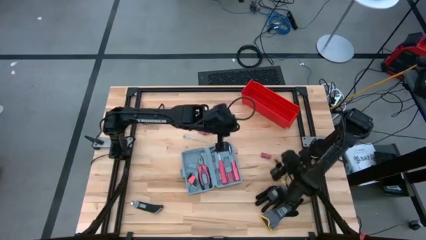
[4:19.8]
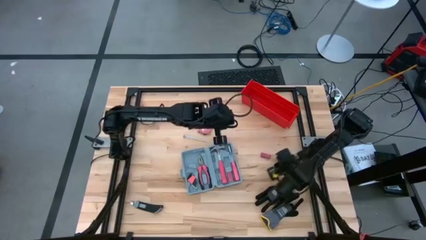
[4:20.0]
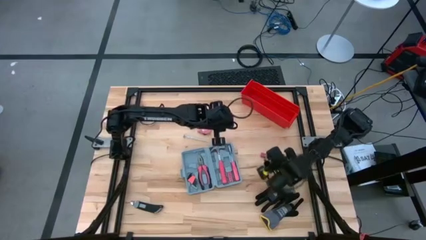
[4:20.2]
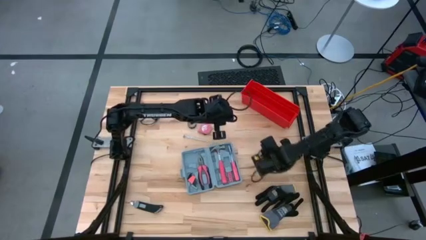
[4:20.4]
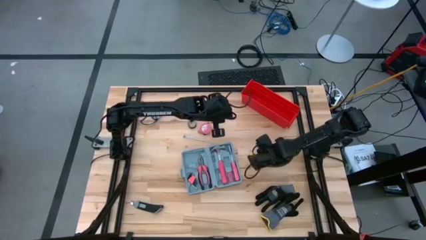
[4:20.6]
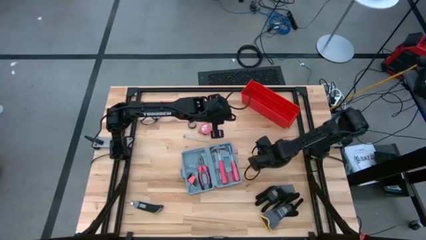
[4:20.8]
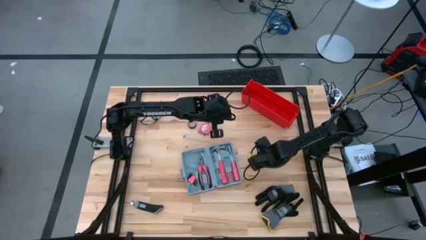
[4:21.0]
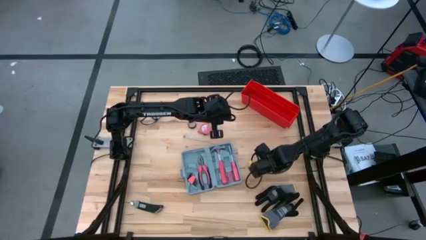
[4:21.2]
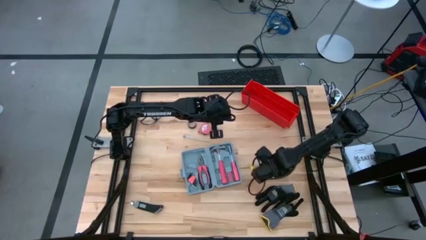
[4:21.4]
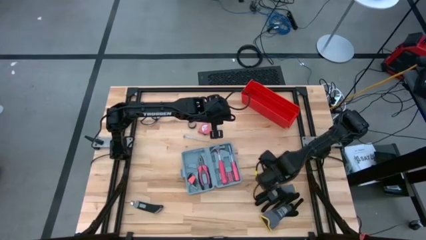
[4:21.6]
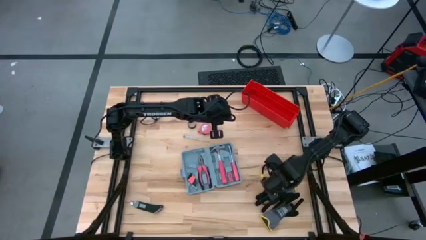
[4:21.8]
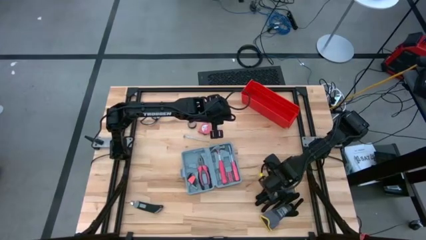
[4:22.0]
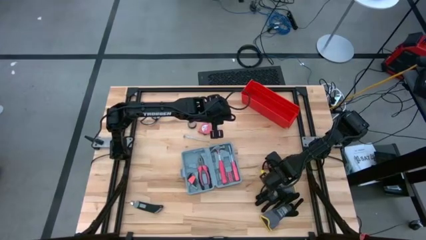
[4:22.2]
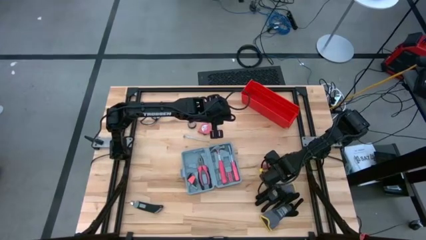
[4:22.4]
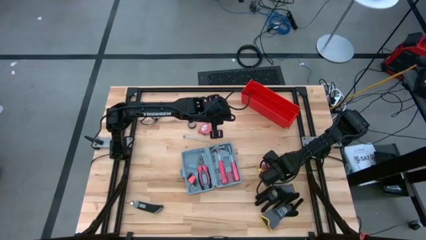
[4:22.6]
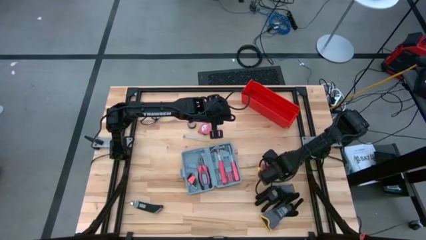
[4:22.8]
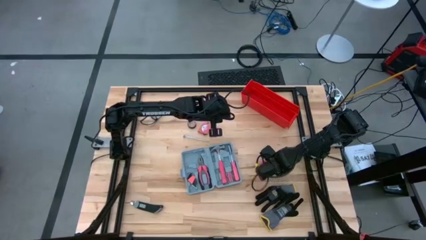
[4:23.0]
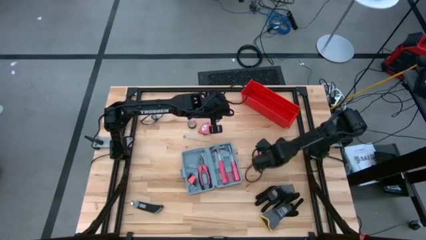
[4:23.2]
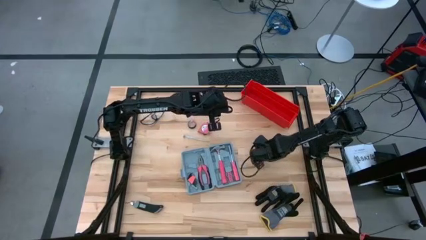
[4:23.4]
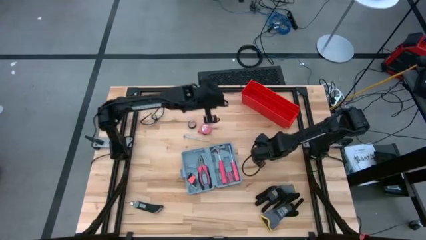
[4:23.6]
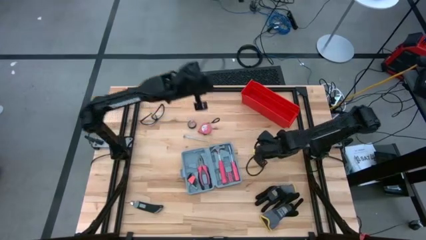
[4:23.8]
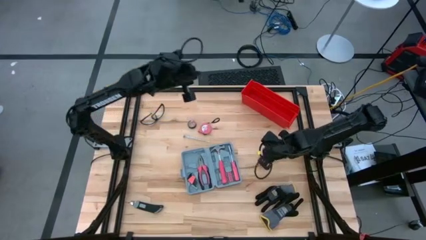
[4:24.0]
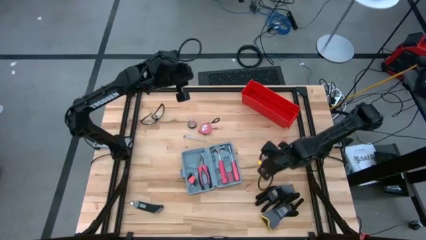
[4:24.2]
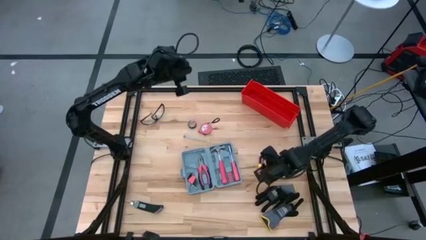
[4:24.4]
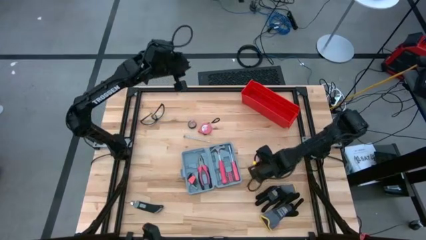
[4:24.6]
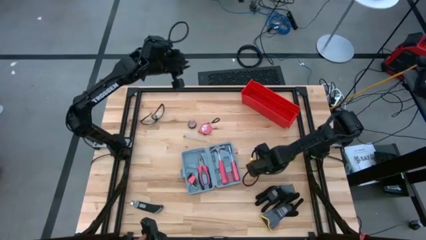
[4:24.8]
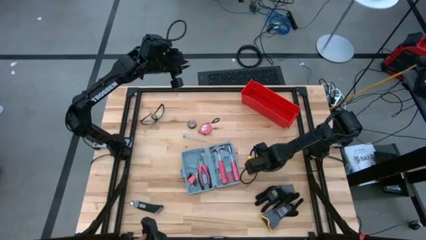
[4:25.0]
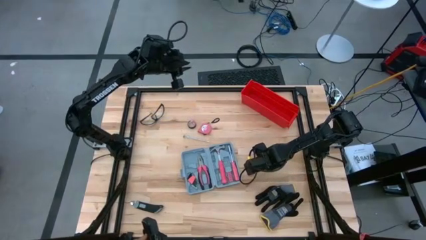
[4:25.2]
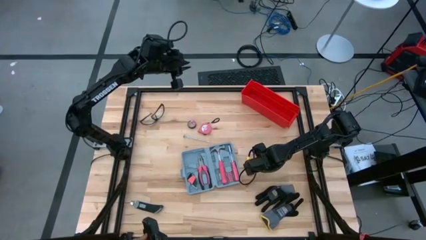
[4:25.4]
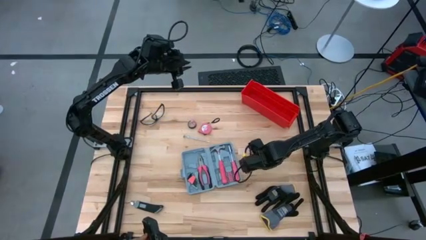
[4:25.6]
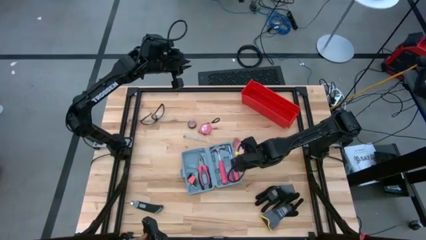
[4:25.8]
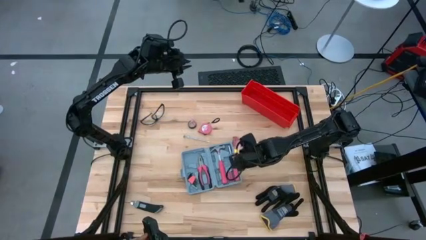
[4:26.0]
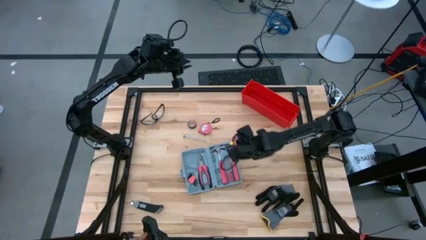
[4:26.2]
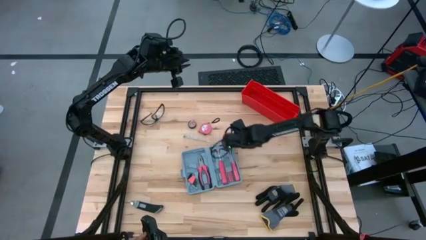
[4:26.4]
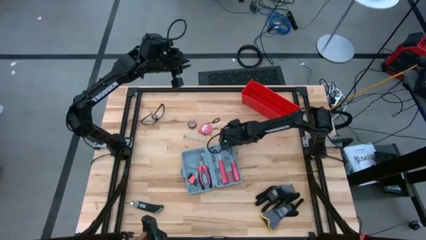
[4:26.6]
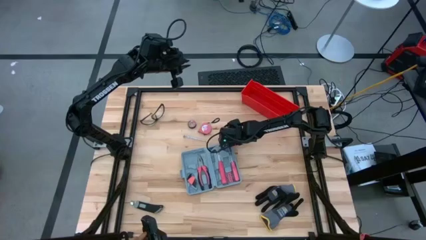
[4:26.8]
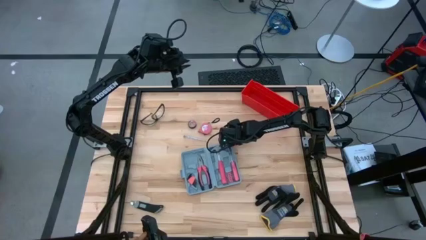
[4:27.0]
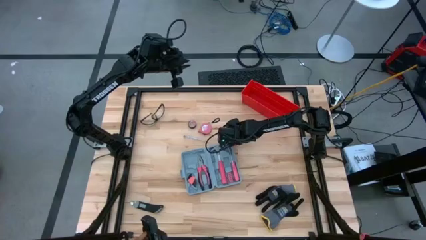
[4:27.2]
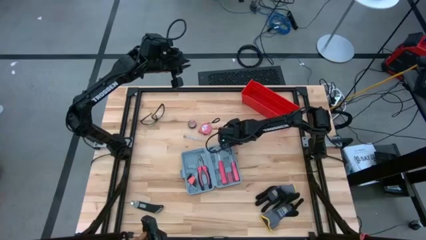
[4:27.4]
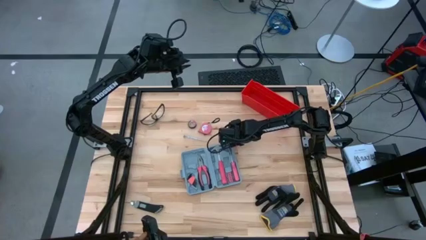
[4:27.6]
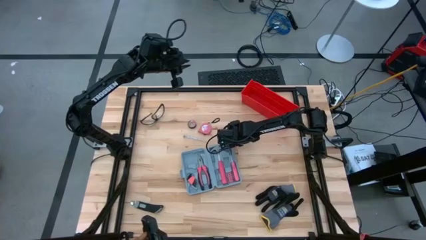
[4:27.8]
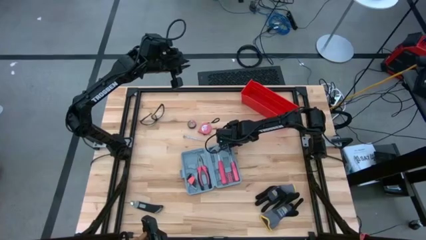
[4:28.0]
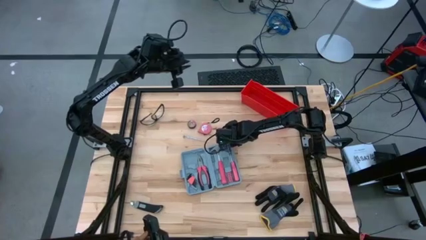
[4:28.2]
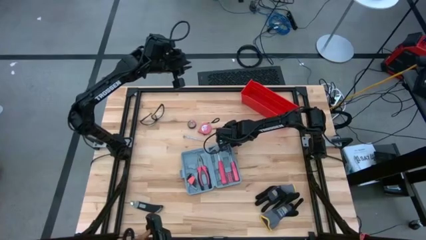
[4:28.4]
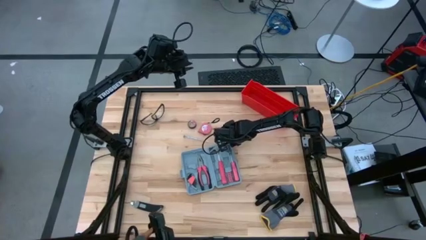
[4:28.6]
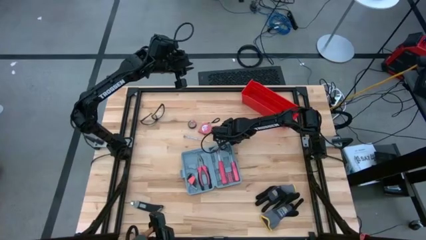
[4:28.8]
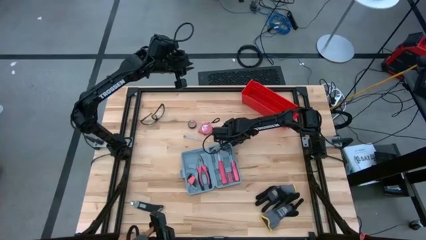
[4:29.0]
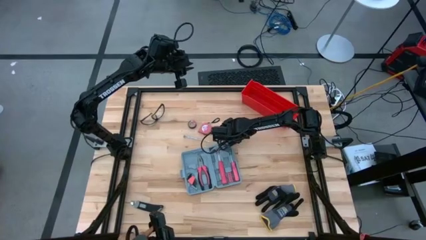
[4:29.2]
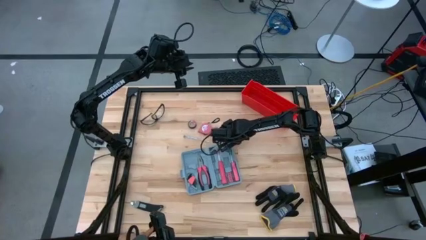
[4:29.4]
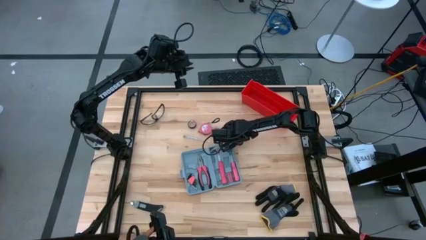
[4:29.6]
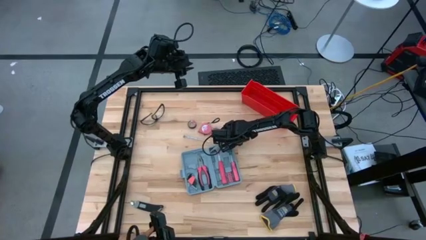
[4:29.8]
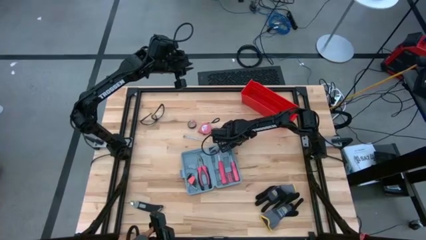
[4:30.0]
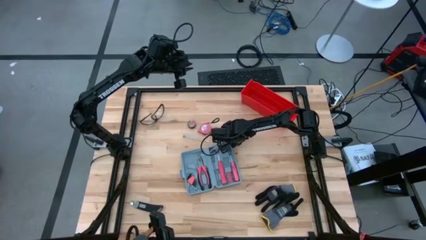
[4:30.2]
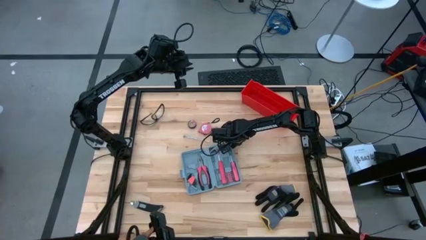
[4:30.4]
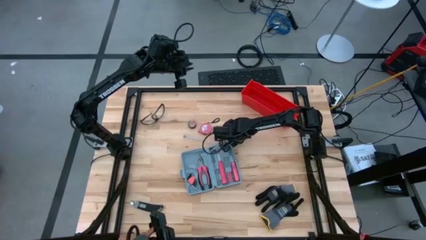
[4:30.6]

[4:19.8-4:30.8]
Task: prefit tool cases
Put the screwdriver bits into the toolbox

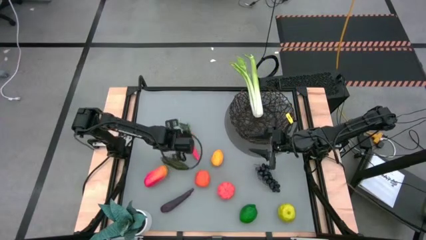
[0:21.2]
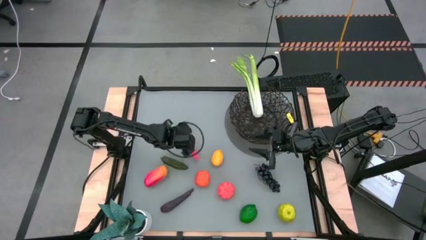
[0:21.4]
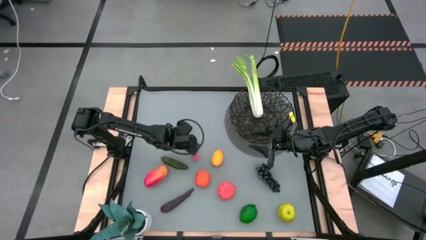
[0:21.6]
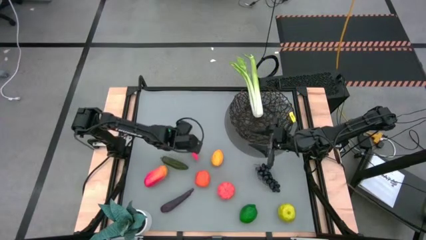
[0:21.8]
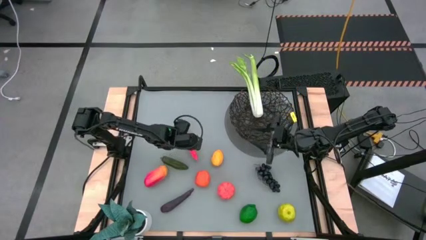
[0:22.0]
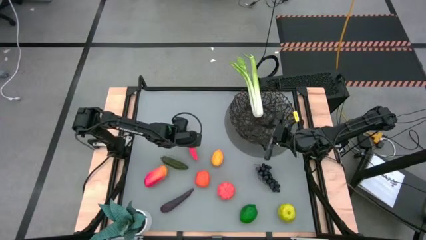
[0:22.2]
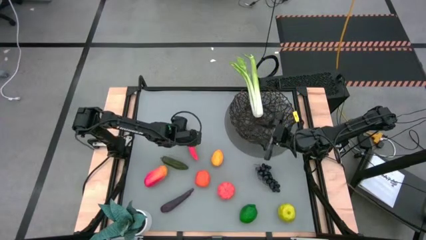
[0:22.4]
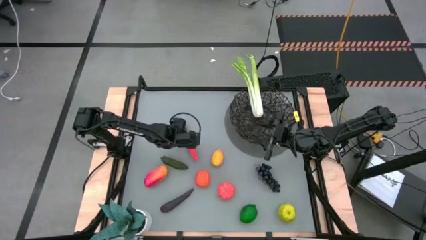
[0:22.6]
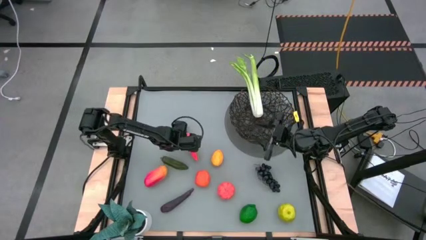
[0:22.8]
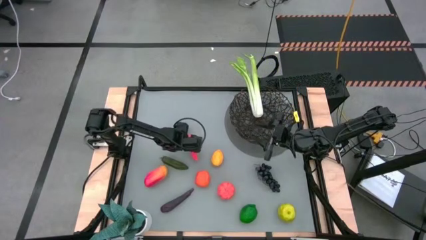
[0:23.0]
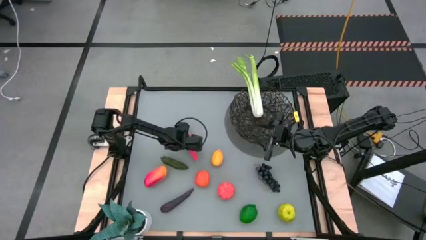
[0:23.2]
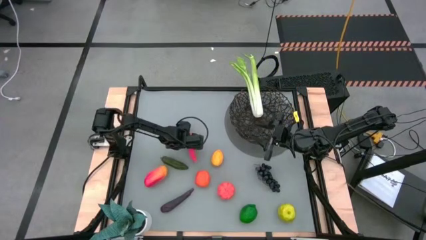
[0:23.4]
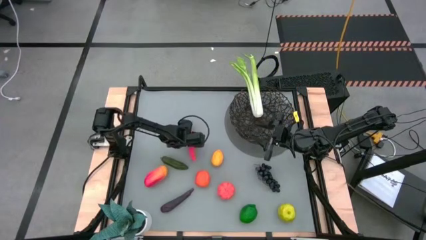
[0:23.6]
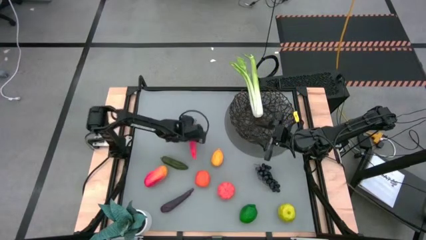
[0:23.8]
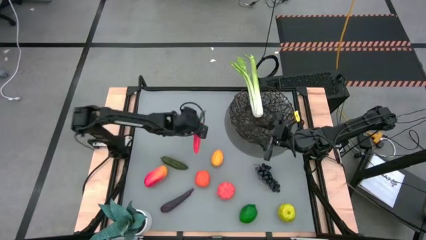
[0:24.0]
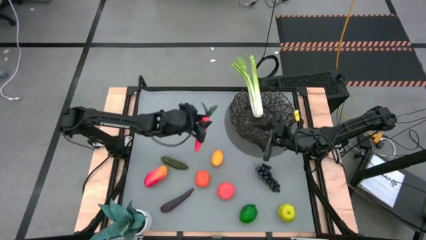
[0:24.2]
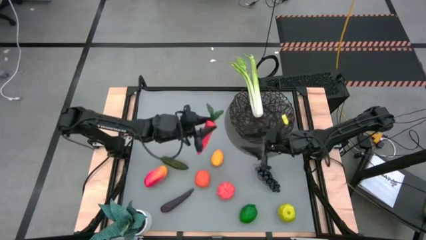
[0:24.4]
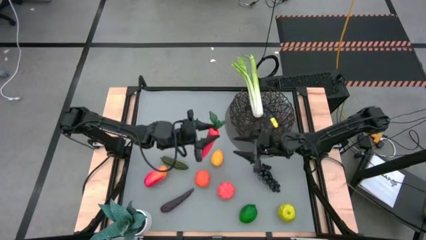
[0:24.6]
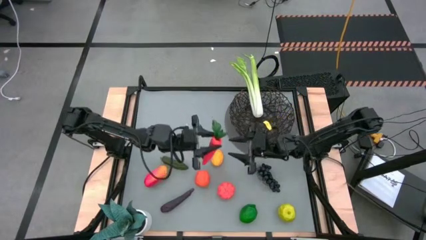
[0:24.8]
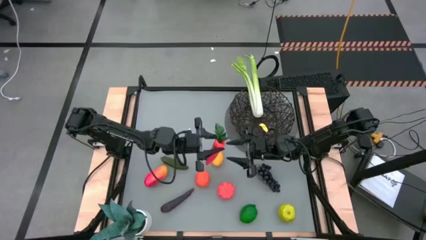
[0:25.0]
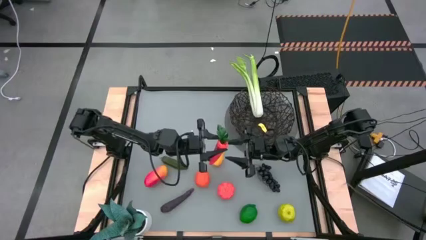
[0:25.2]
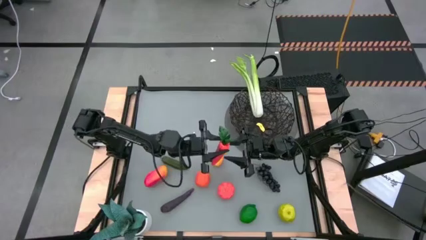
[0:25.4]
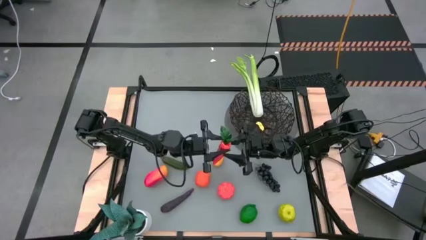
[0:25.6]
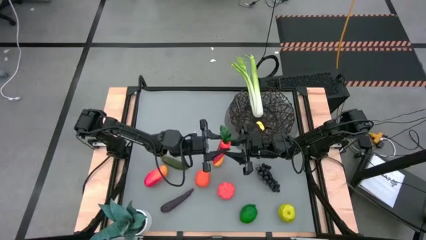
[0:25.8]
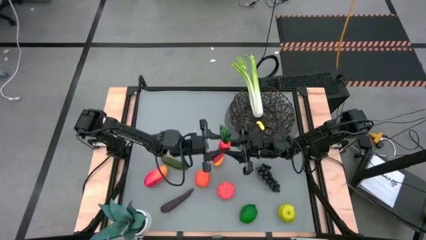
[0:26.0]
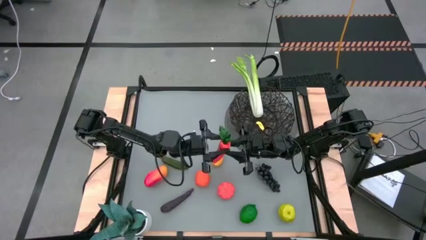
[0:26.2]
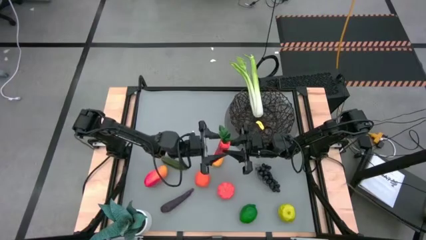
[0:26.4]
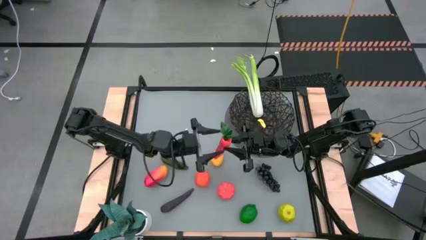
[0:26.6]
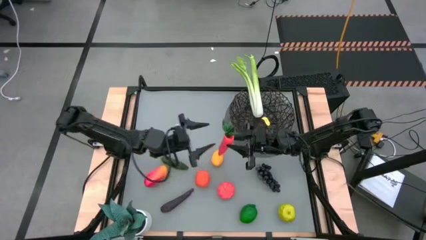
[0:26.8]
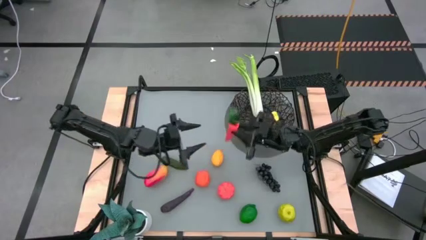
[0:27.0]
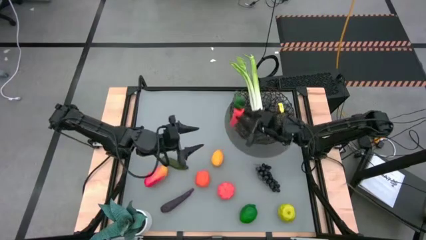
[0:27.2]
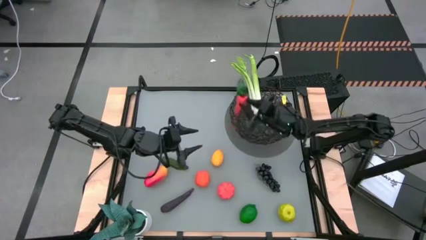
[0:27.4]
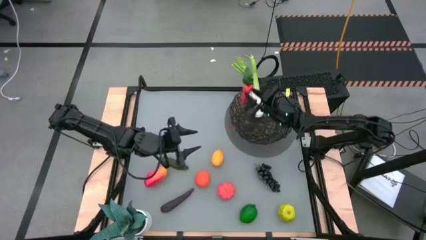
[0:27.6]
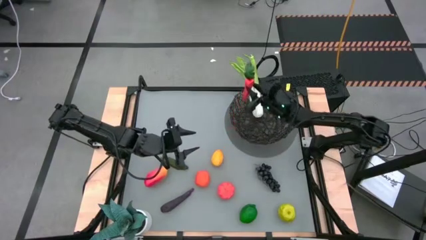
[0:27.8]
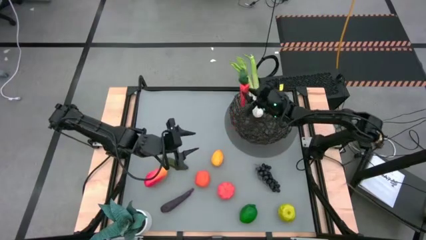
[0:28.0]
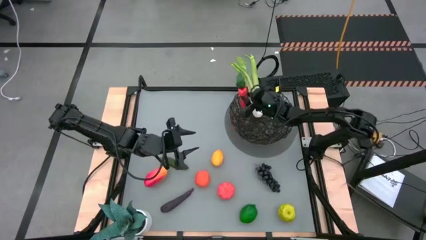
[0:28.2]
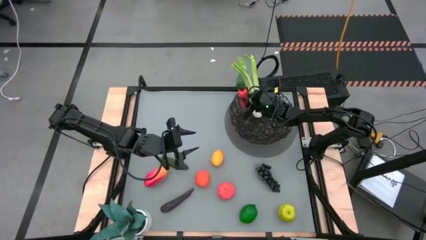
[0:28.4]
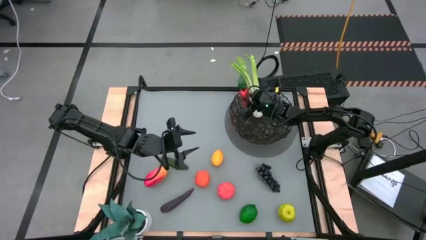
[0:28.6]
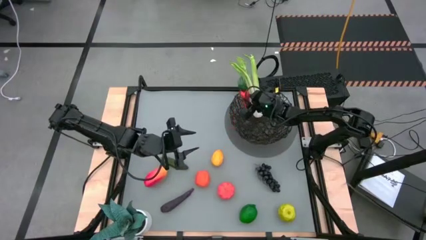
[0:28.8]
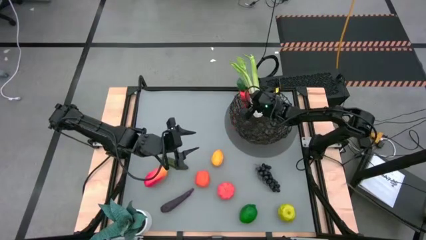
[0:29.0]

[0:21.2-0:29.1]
Task: Build produce basket
Put the carrot into the black wire basket
